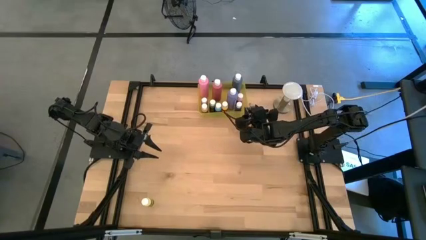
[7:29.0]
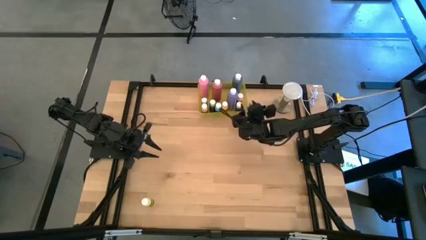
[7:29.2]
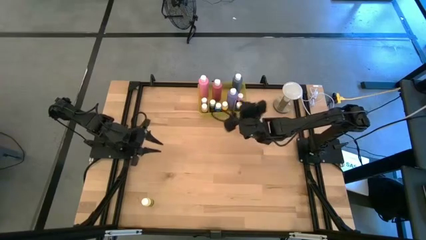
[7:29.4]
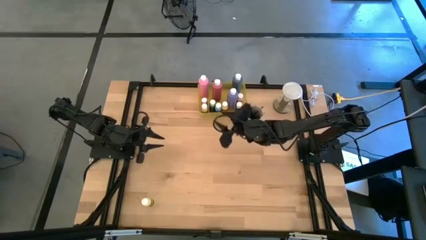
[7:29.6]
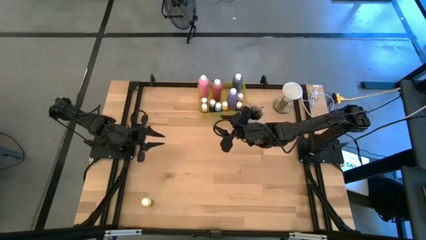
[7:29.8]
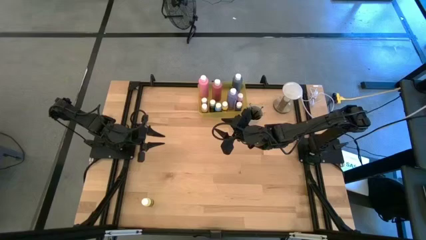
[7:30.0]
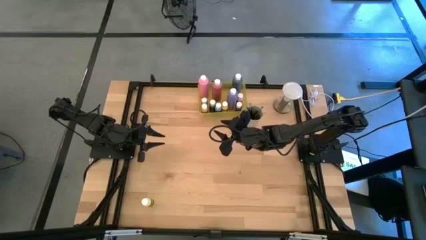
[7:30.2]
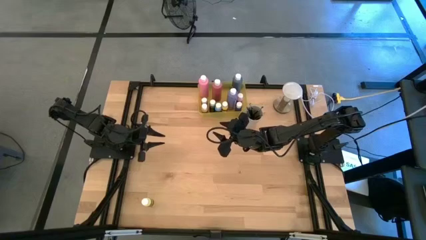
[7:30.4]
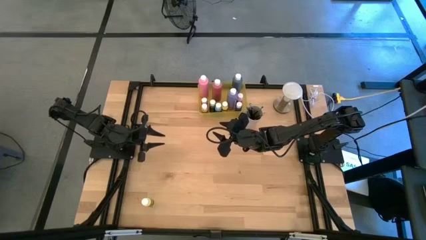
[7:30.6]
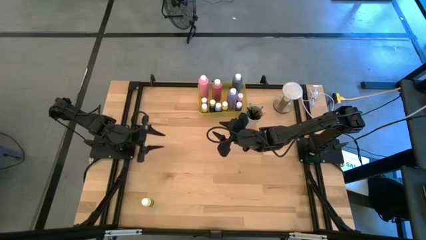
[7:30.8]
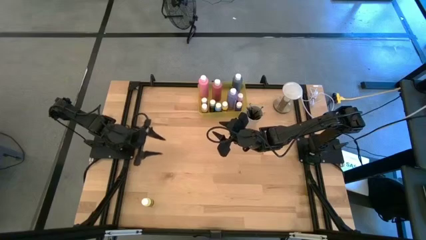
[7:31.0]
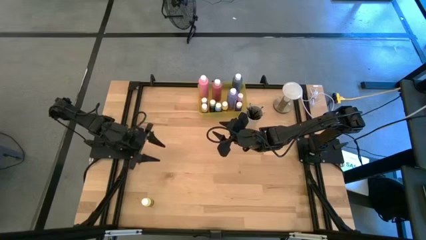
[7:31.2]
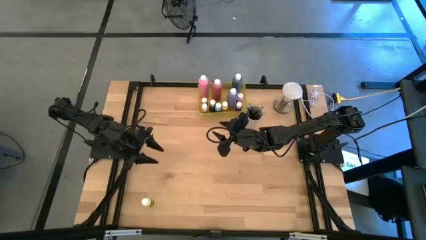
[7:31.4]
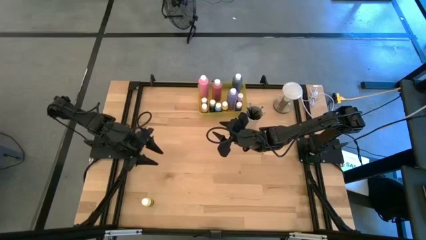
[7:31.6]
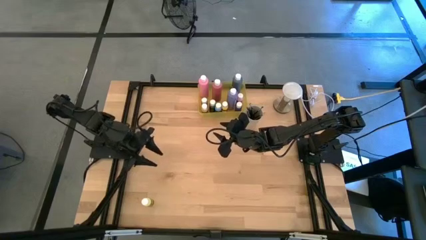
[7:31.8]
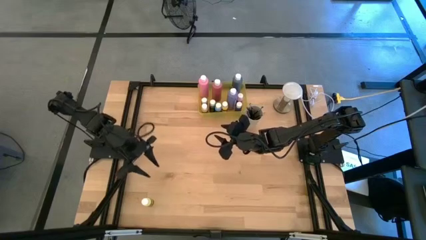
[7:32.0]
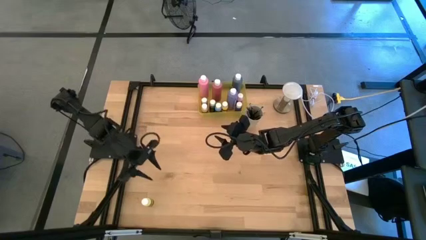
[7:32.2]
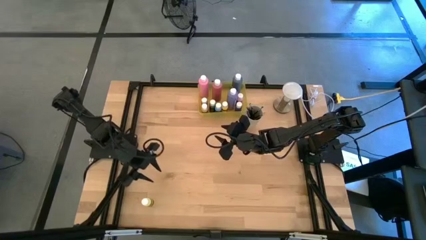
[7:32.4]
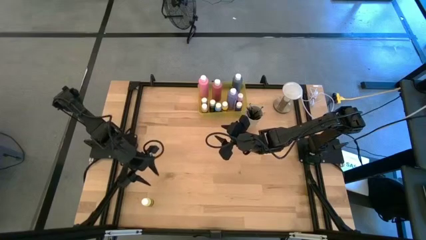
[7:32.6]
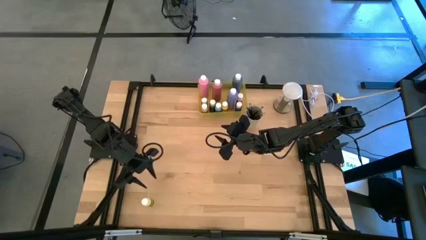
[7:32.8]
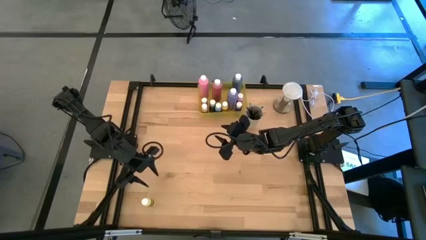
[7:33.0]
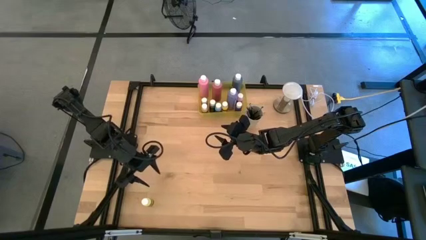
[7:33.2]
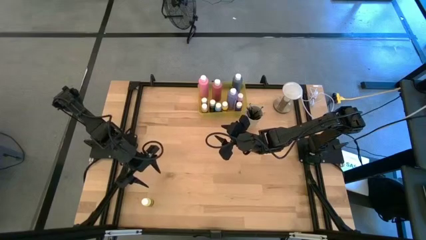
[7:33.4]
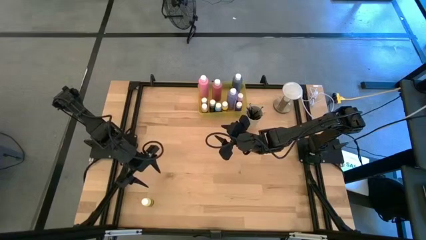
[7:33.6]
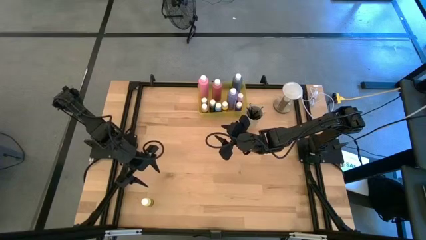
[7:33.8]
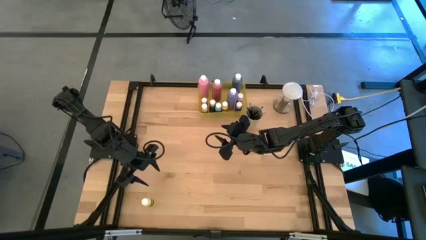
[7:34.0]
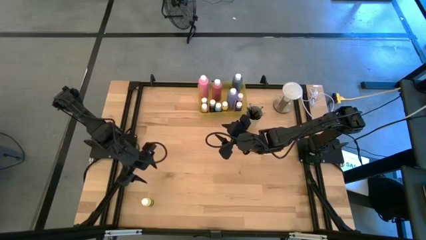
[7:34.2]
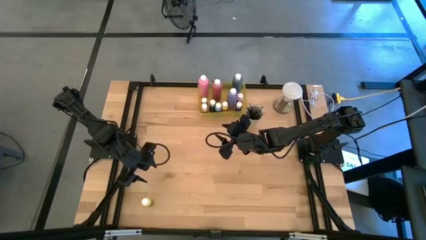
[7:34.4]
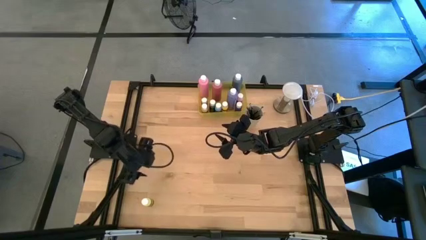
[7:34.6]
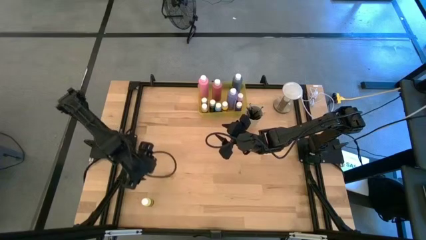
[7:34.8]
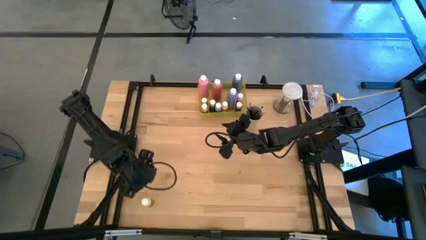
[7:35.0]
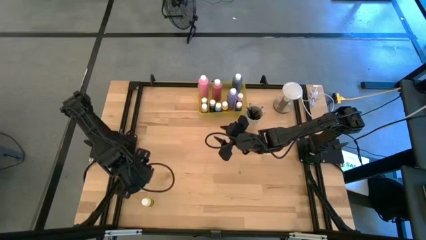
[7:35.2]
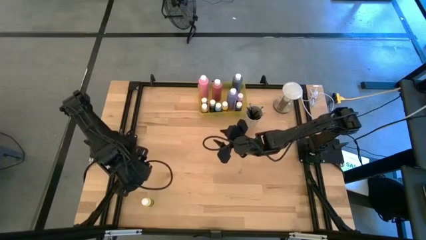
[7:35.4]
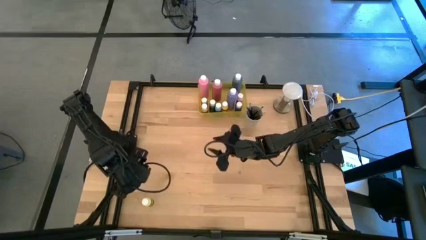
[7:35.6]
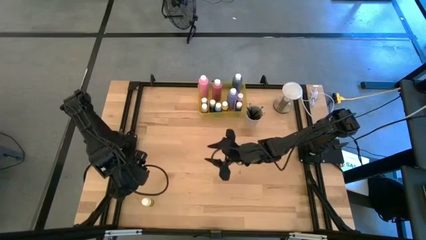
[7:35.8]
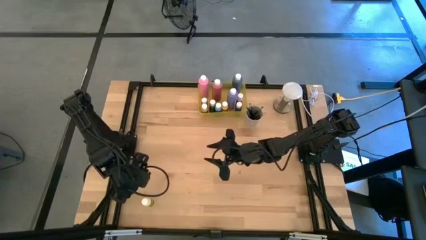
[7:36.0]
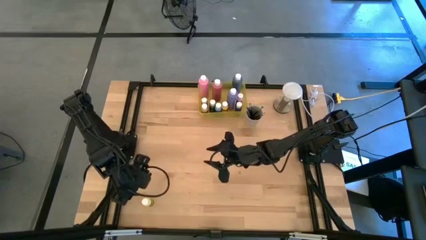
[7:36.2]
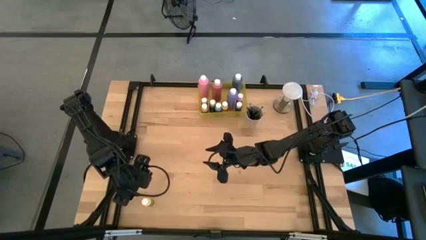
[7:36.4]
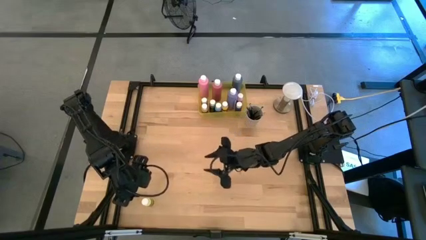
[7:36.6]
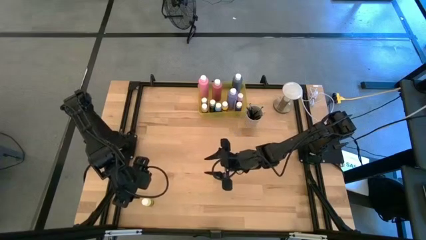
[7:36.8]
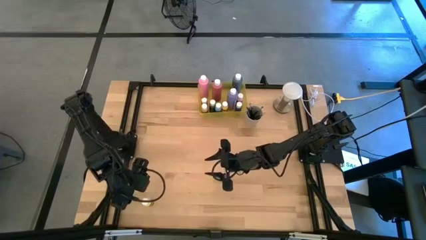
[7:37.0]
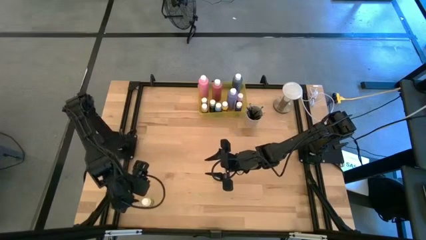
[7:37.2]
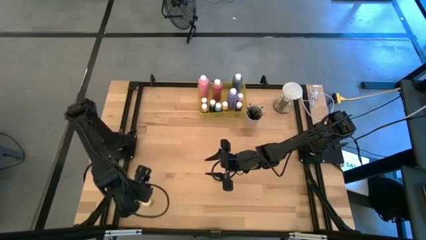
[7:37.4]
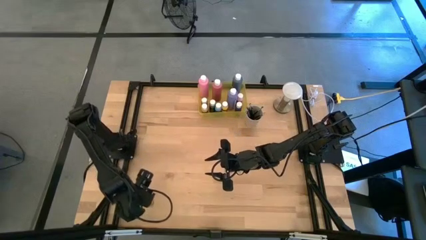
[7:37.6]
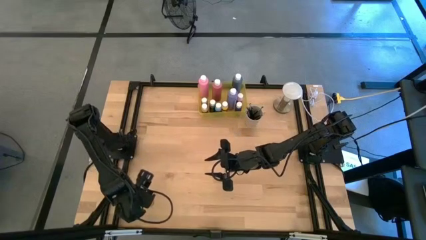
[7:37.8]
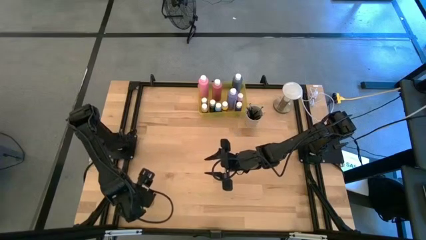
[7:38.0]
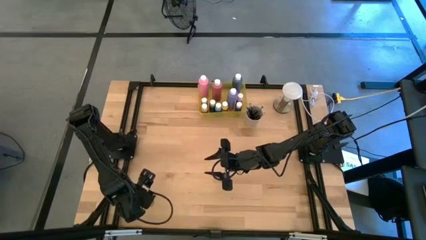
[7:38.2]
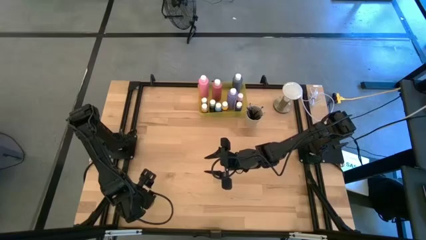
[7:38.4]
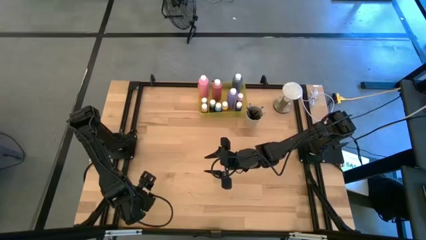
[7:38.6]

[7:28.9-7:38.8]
Task: Pick & Place Paint Supplies
Put the small yellow paint bottle into the yellow bin

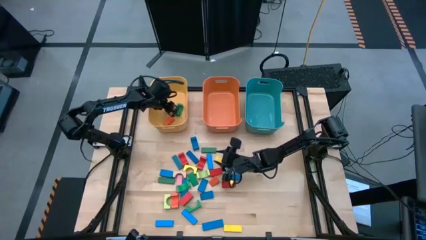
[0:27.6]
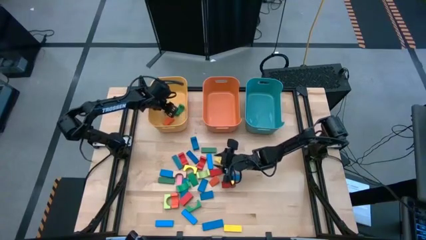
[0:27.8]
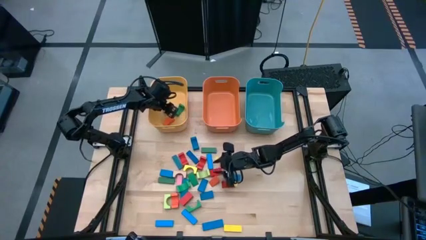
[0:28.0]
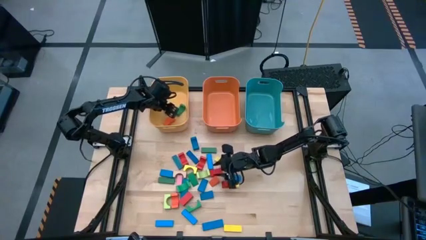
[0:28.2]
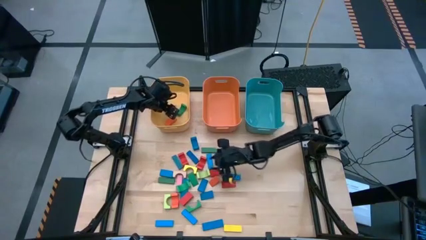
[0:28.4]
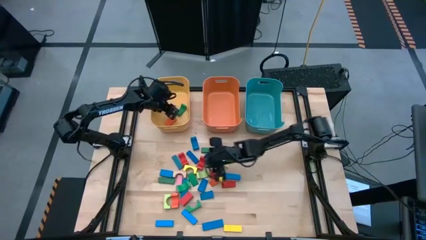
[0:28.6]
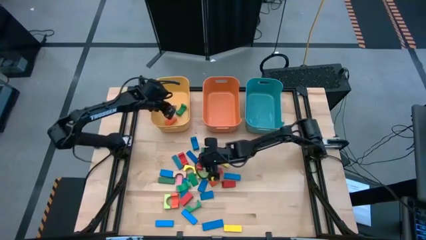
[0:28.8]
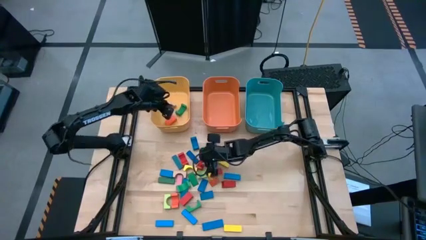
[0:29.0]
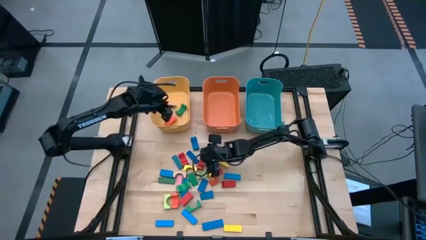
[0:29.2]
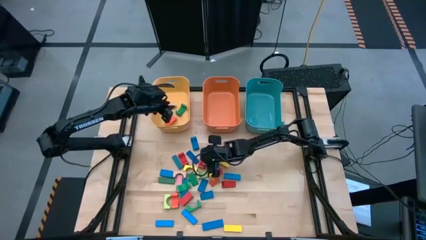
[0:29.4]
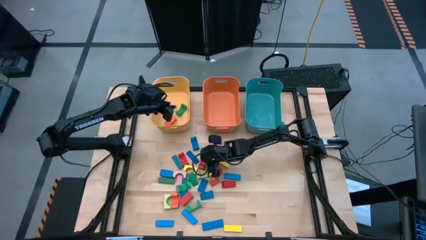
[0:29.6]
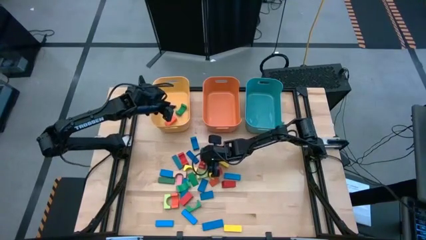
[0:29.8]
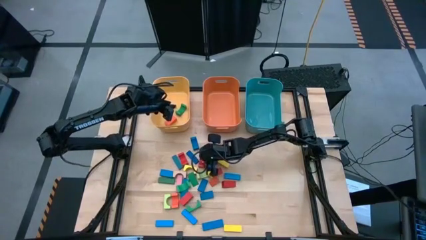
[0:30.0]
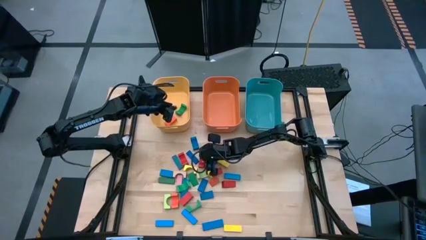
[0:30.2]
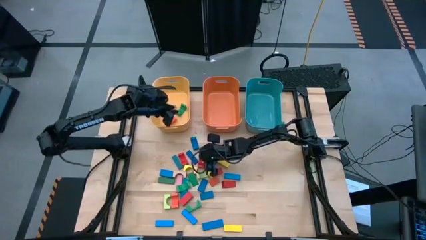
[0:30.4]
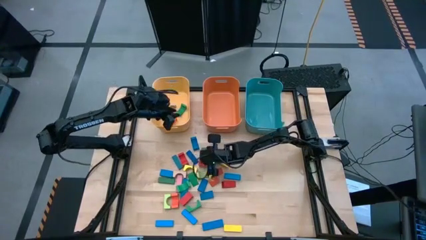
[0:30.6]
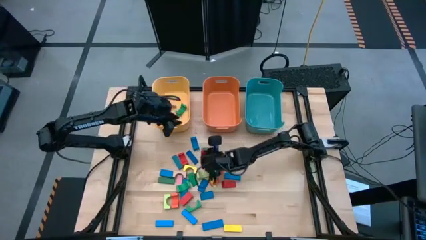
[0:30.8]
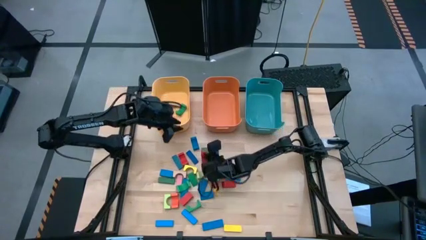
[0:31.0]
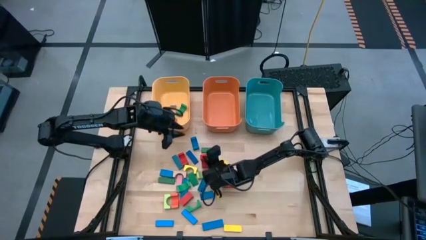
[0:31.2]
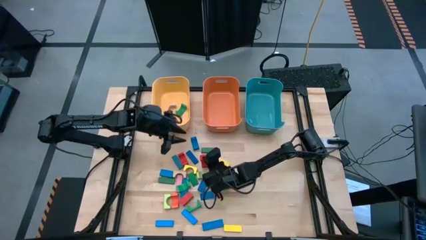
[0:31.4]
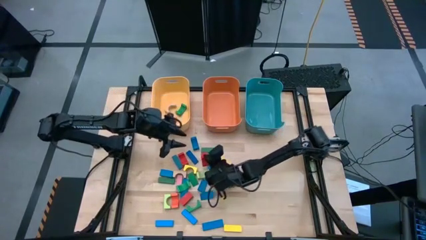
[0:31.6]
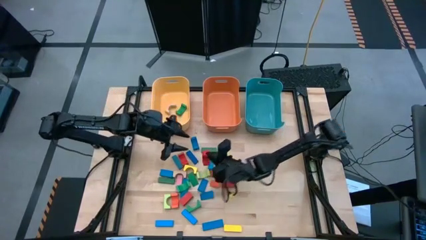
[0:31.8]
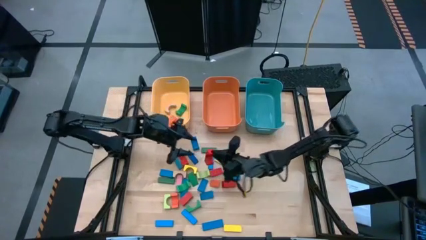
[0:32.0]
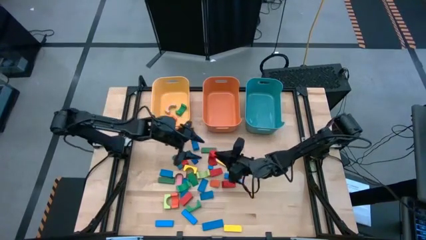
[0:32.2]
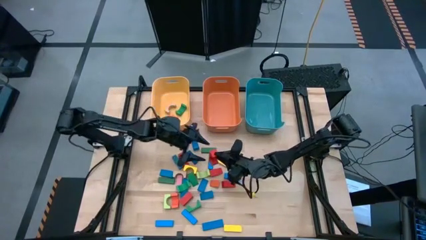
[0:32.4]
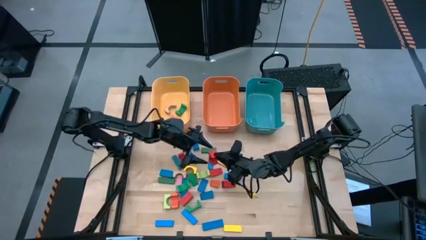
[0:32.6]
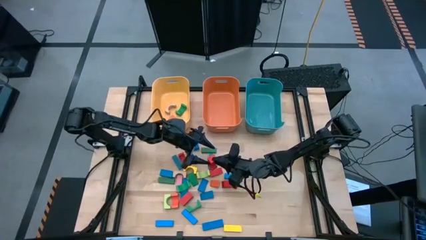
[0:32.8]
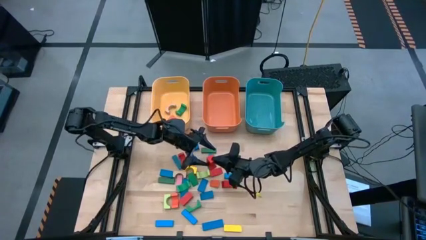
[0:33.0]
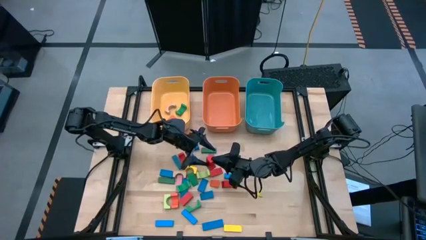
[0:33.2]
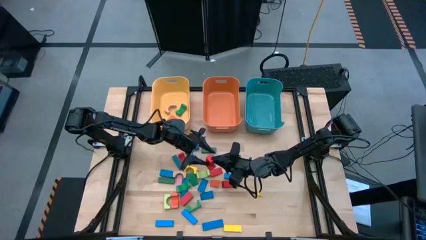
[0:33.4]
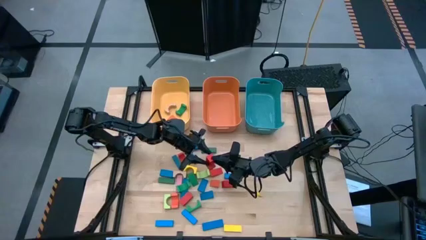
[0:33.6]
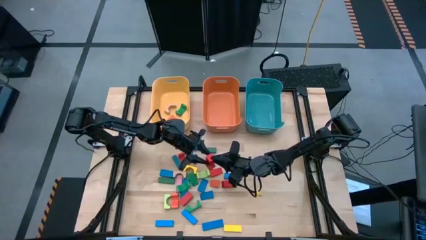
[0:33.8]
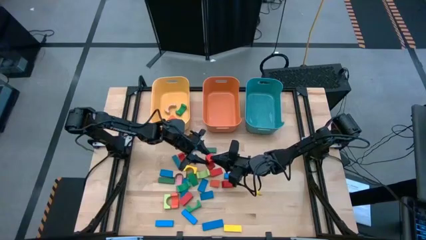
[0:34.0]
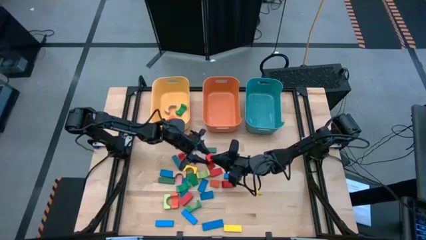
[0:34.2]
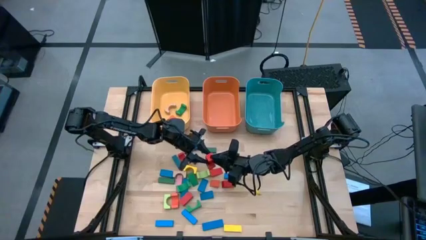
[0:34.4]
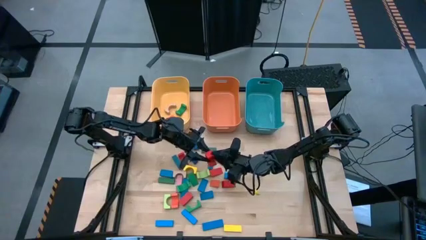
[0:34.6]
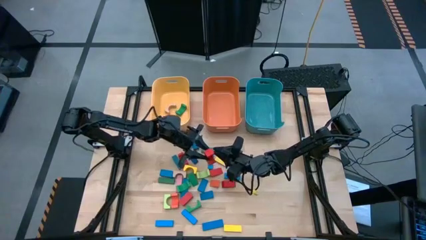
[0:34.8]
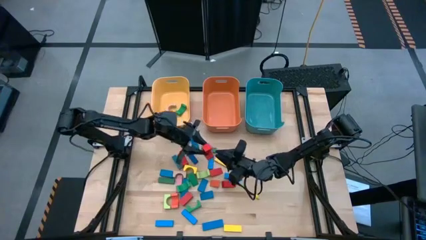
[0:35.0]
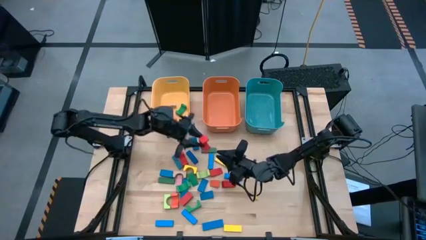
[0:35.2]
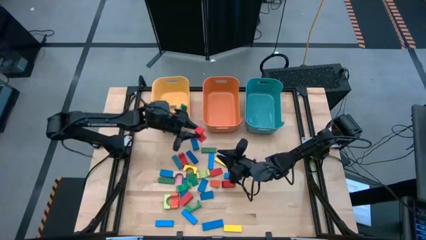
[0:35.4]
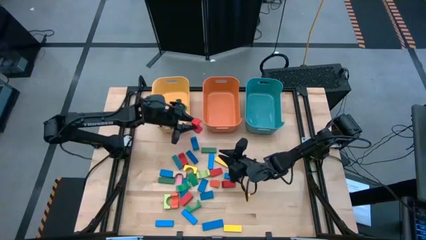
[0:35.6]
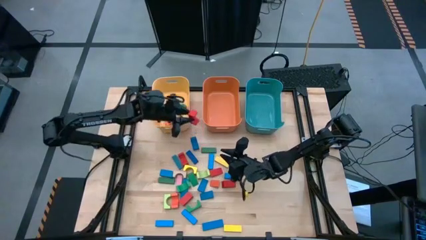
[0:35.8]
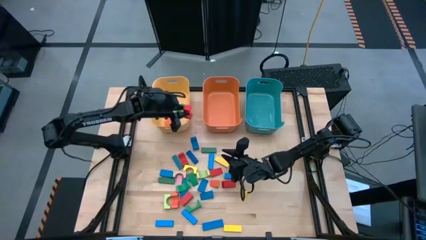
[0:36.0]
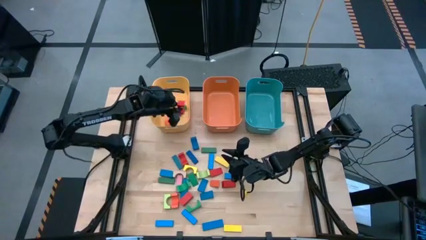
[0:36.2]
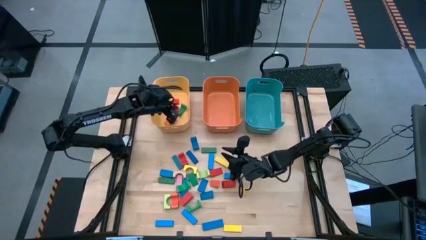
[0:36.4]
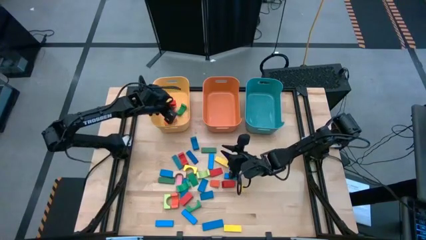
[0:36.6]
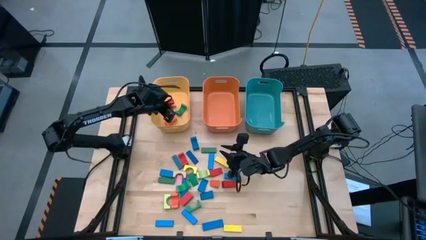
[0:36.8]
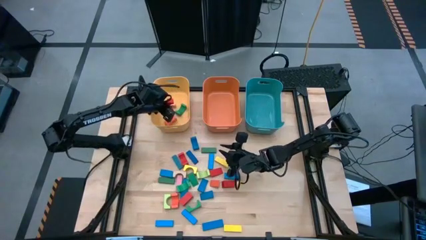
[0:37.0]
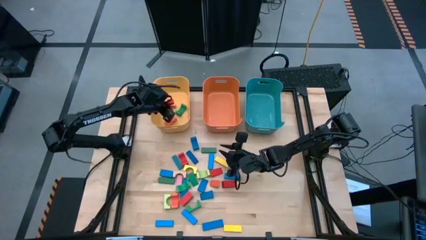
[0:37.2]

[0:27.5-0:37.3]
Task: Sort blocks by size
Put the red arch block into the yellow bin
